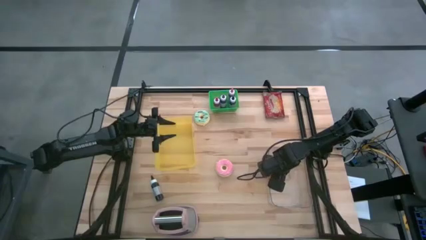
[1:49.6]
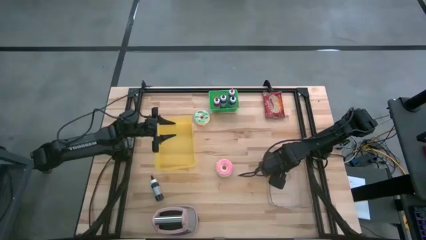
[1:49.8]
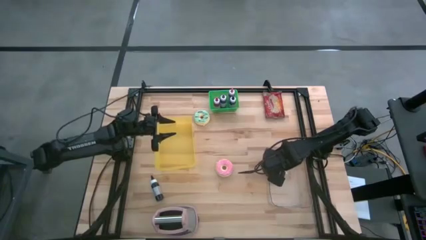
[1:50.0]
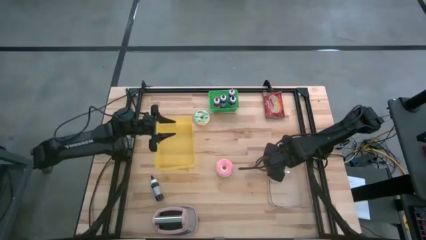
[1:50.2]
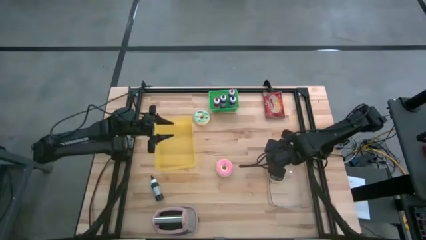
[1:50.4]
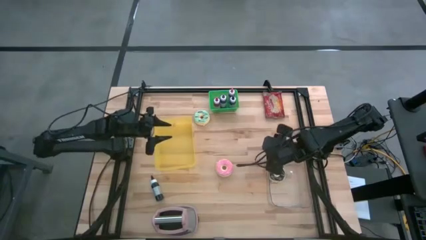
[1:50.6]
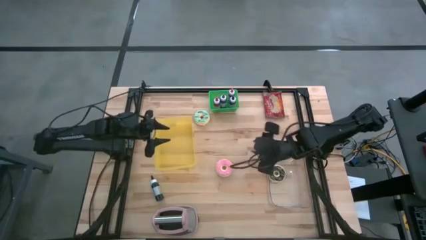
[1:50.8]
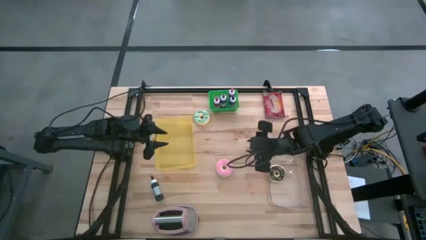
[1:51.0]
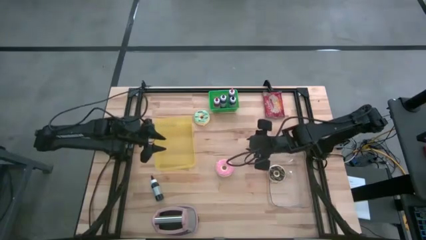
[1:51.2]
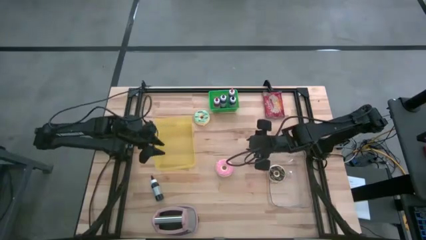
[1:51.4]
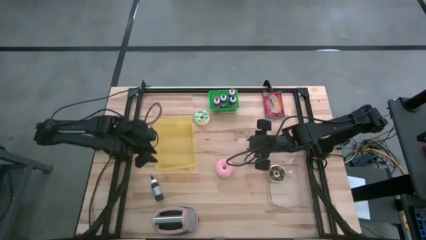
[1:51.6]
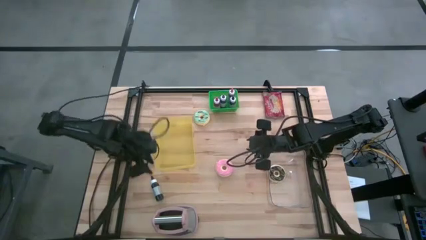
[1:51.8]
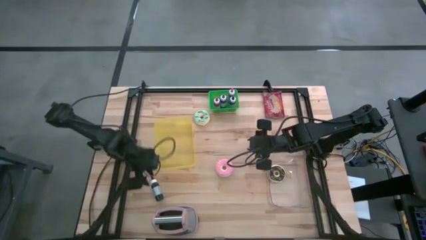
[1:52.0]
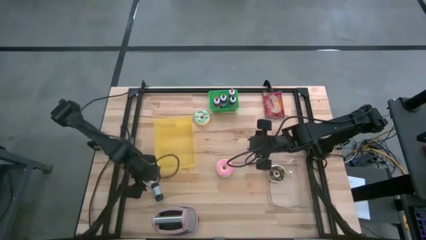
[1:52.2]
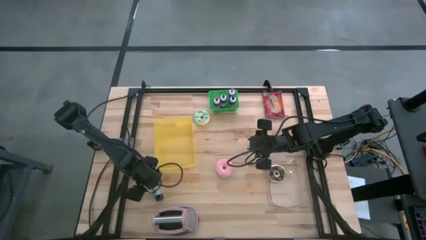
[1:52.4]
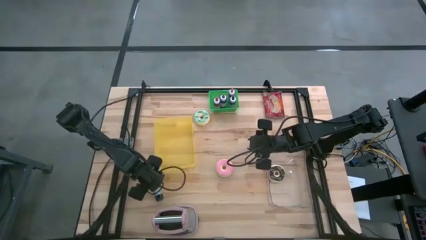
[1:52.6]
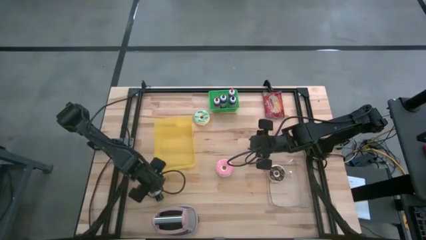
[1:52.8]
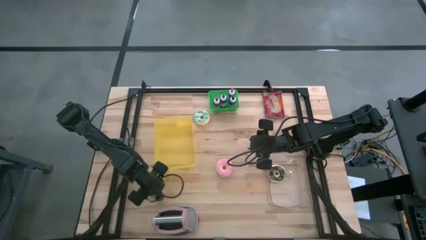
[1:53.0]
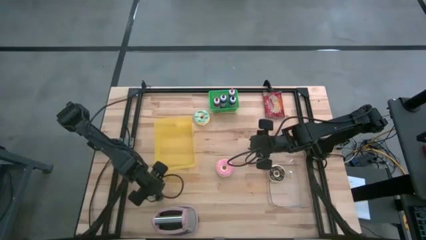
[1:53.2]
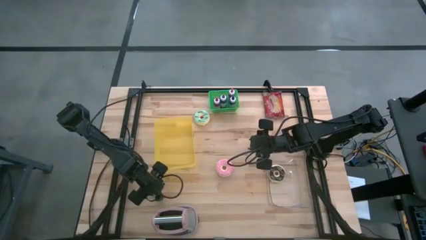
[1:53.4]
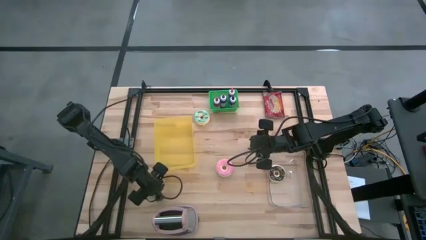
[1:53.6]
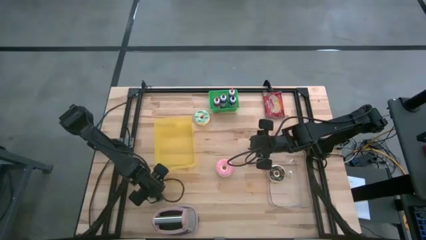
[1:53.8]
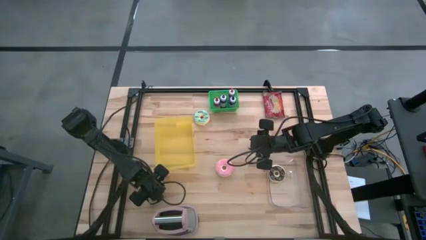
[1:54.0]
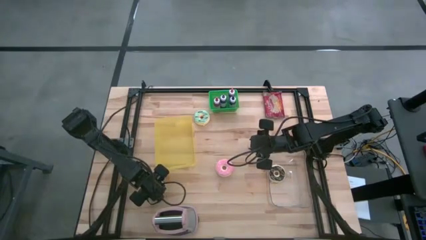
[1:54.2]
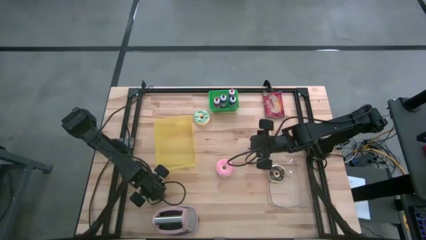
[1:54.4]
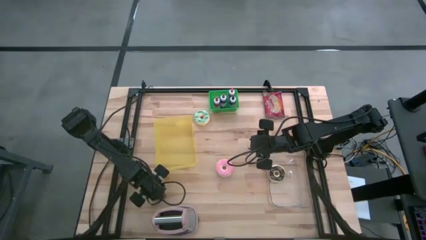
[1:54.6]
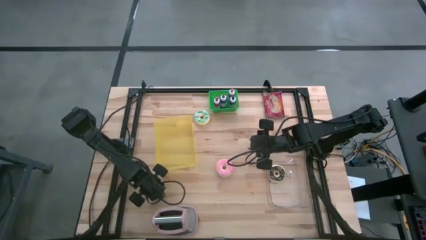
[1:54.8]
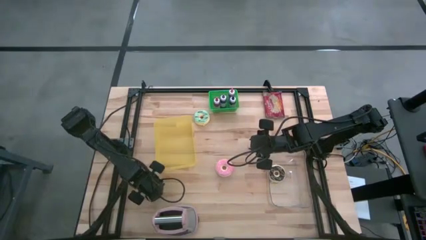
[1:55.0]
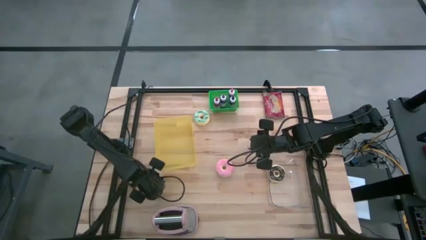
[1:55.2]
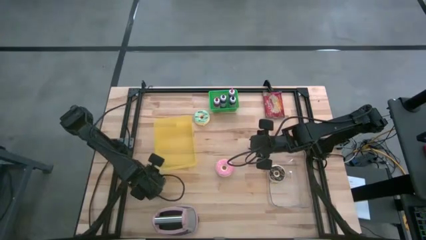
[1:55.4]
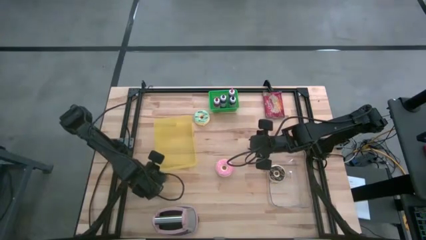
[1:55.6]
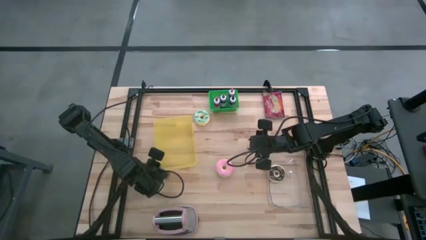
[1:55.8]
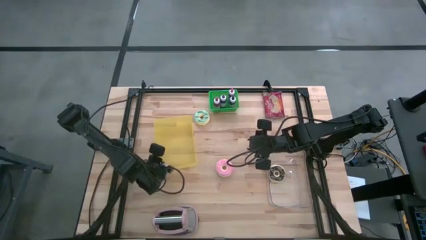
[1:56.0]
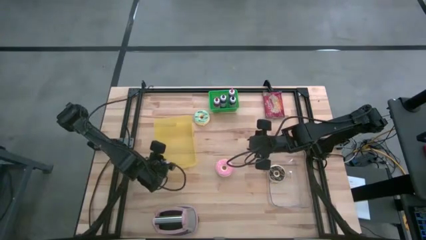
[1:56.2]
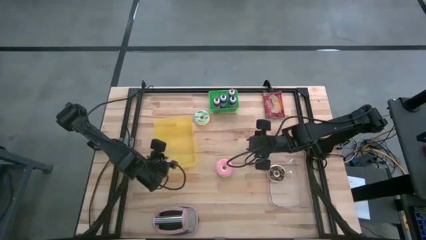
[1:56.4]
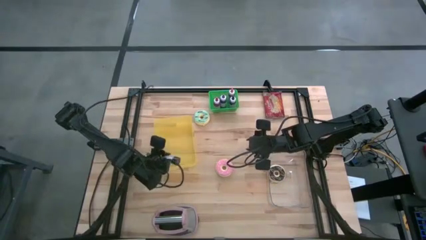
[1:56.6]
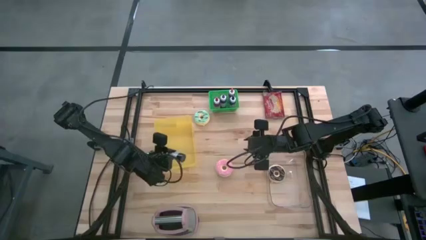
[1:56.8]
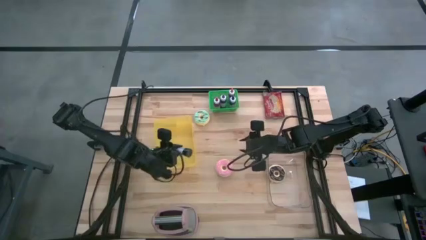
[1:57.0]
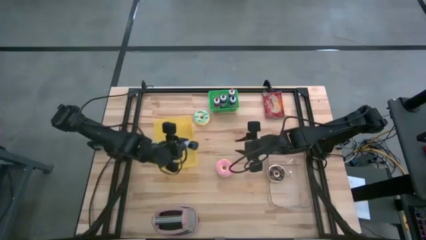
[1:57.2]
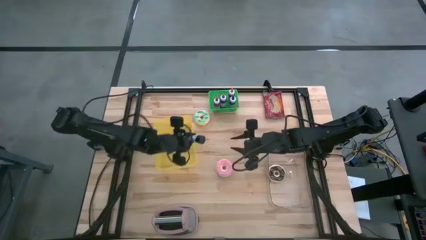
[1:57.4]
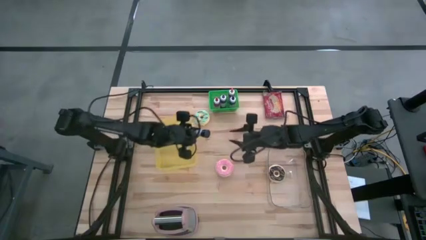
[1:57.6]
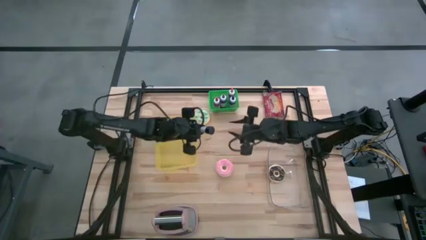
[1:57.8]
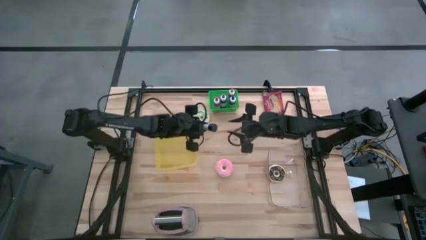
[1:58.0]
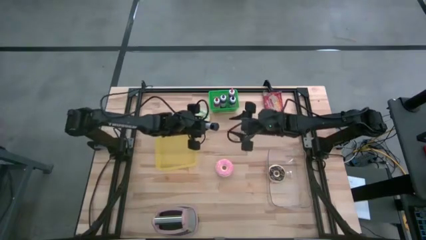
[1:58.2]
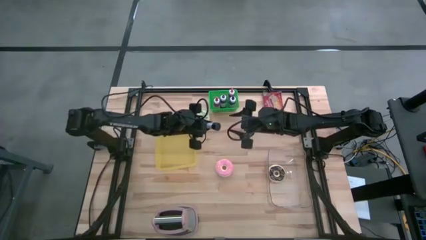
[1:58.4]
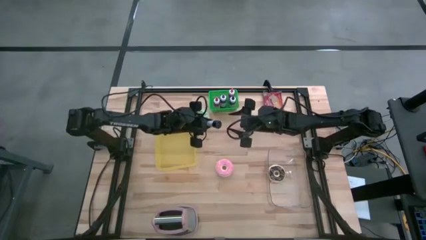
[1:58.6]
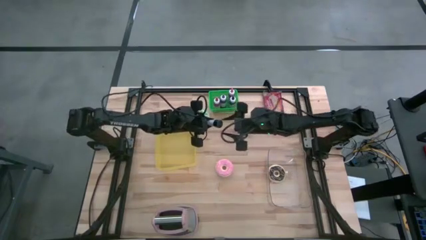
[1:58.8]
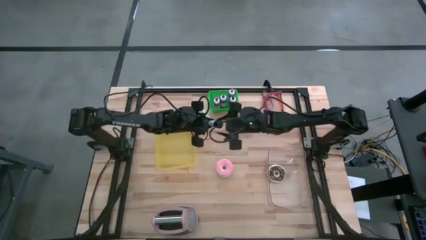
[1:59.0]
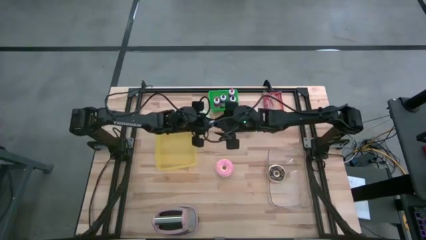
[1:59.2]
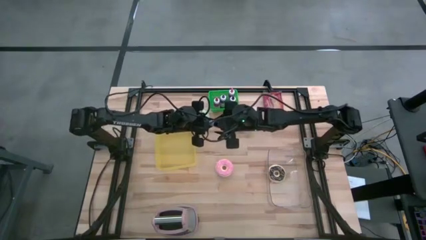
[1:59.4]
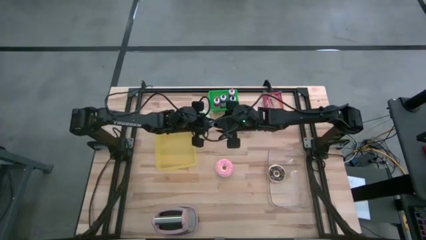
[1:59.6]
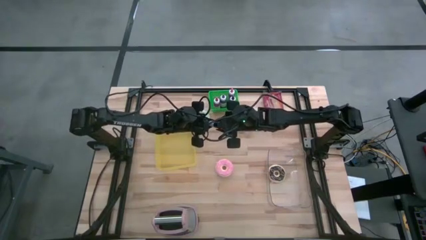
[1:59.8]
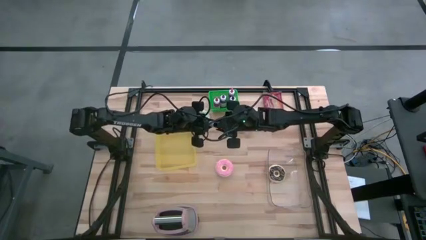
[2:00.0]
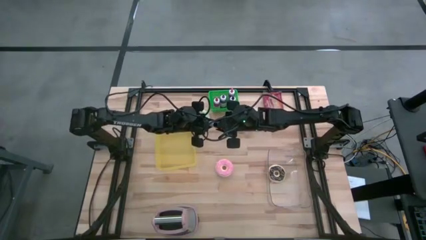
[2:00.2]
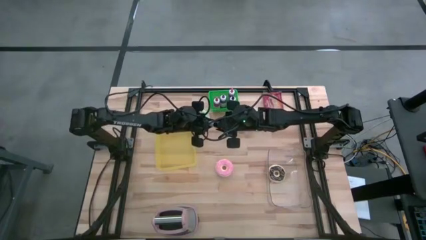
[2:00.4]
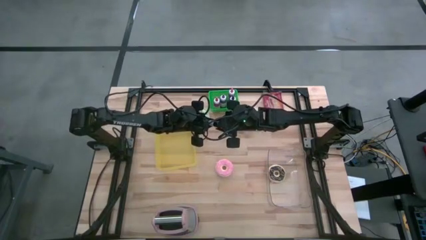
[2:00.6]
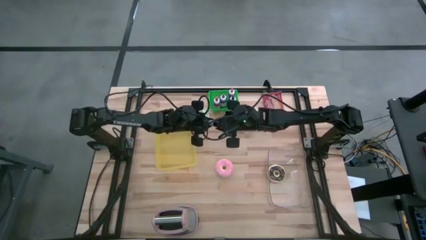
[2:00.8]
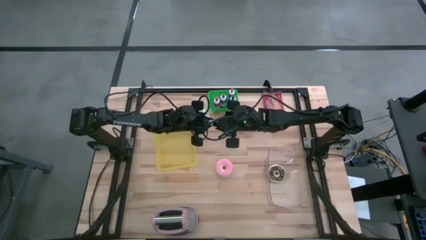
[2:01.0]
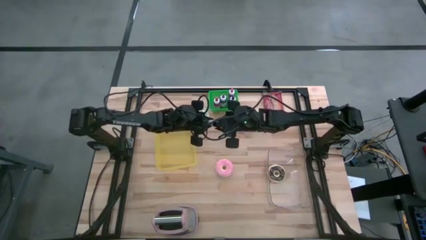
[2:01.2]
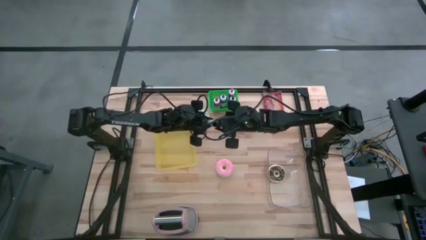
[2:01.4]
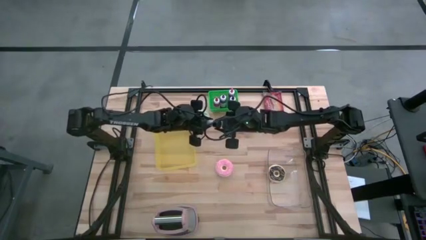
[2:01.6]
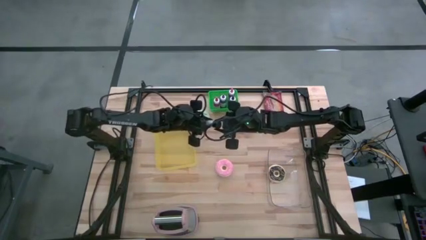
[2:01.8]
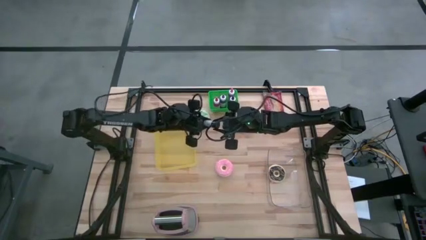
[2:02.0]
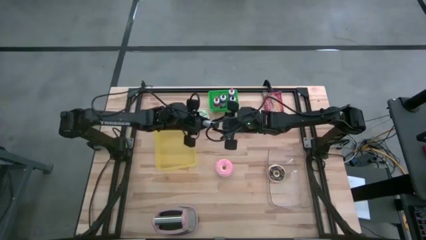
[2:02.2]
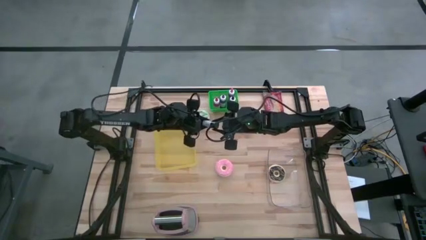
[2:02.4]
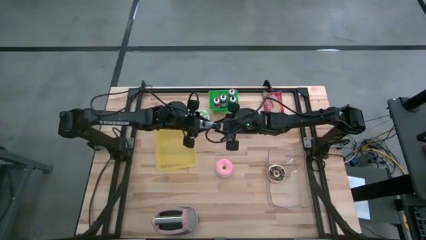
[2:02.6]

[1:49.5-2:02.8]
Task: Pick & Place Food Item
Put the black food coloring bottle into the green bin

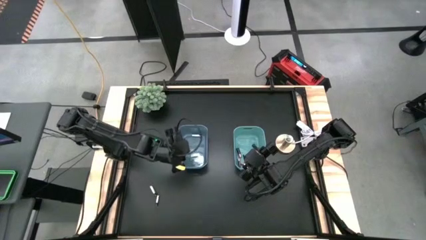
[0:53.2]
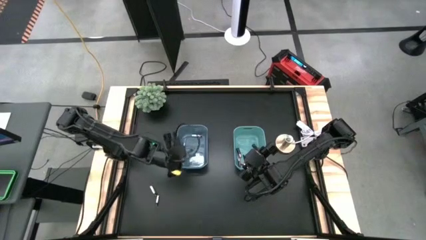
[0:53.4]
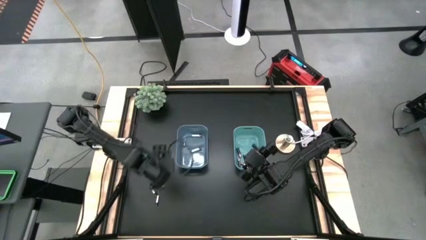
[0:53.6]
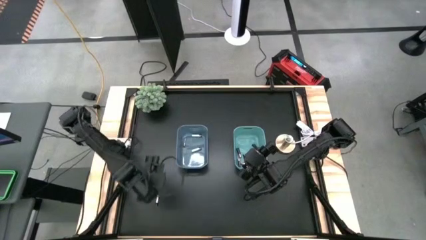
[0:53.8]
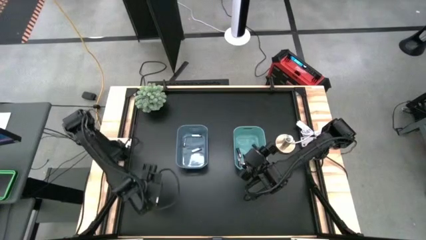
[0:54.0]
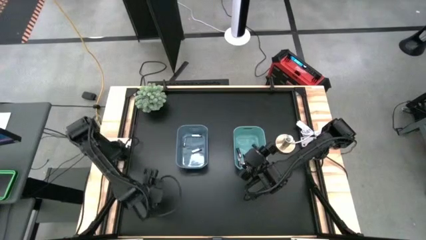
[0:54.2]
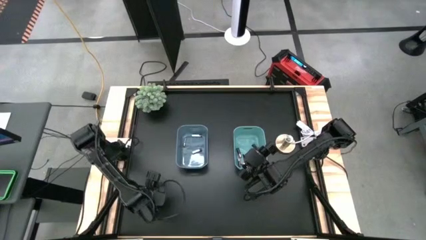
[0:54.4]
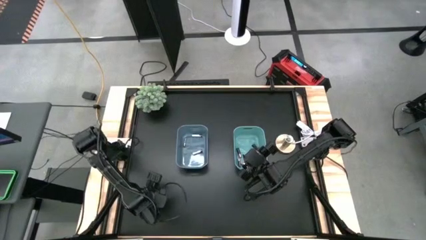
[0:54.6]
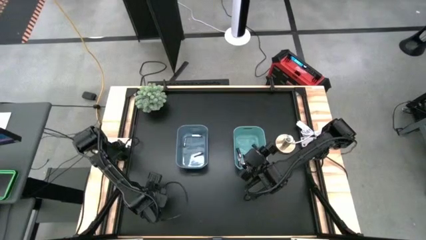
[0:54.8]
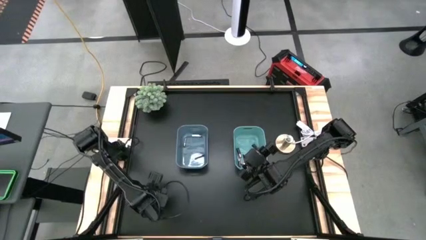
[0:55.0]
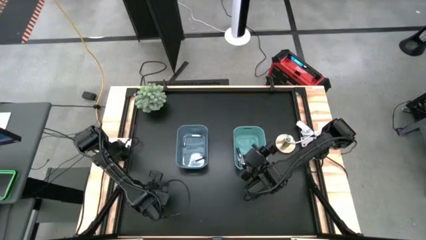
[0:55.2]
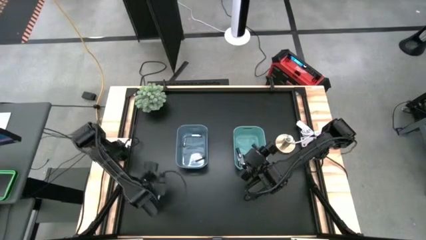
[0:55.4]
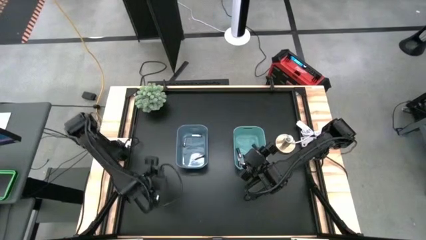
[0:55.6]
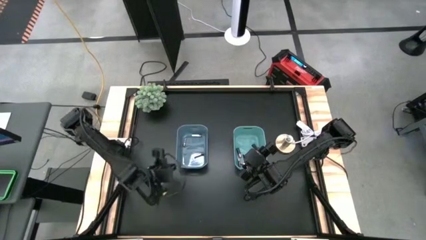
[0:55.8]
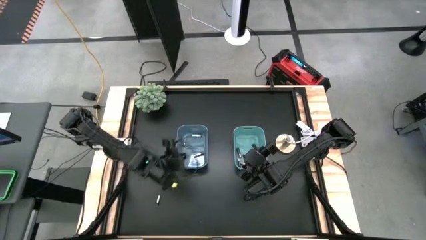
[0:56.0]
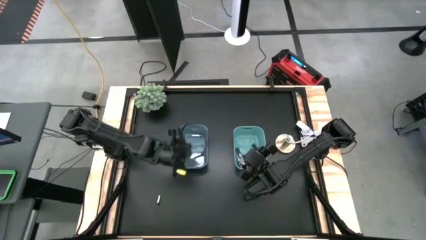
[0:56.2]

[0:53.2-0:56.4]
Task: Sort batteries
Put the big silver battery into the blue bin
